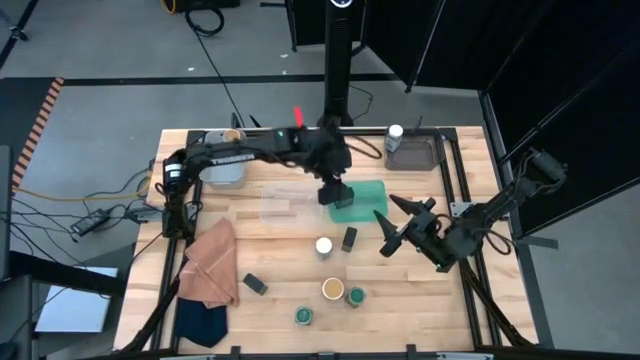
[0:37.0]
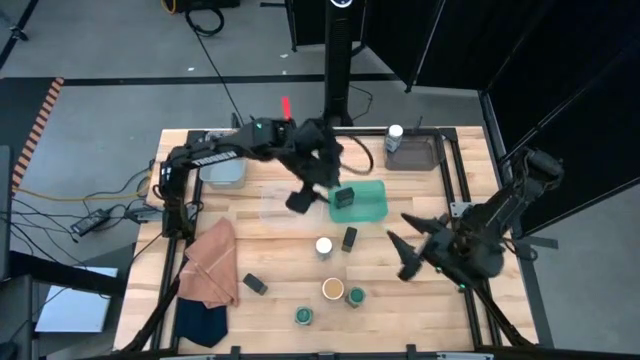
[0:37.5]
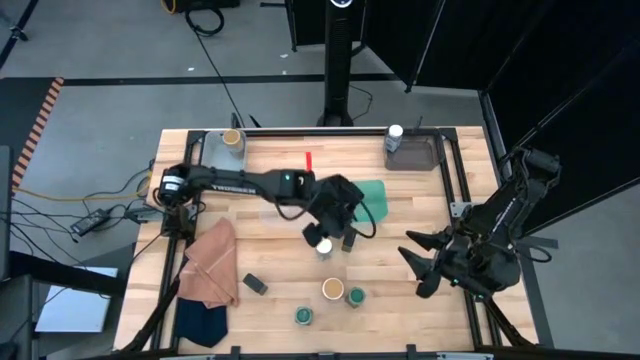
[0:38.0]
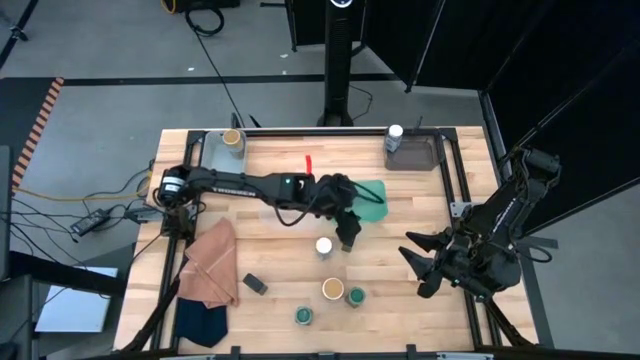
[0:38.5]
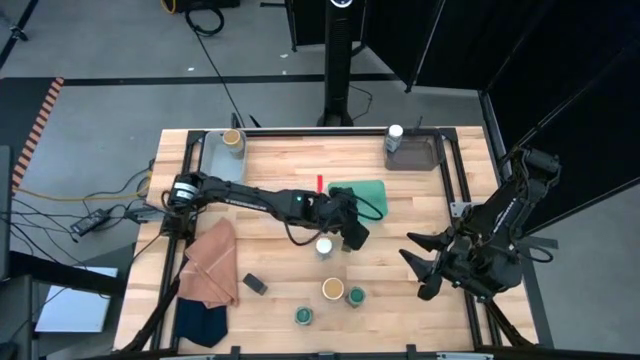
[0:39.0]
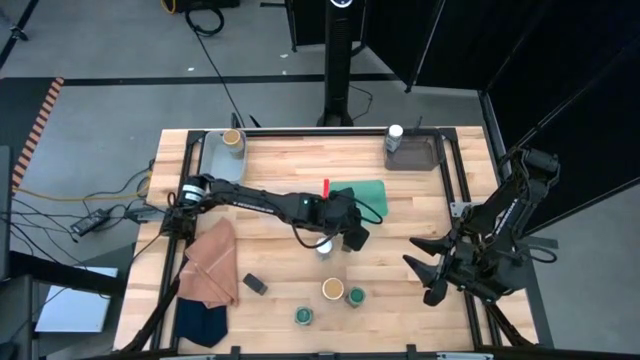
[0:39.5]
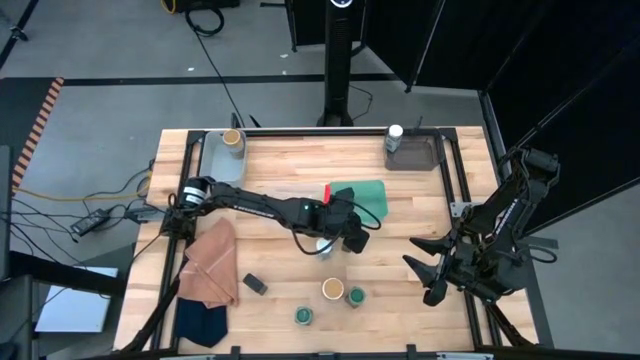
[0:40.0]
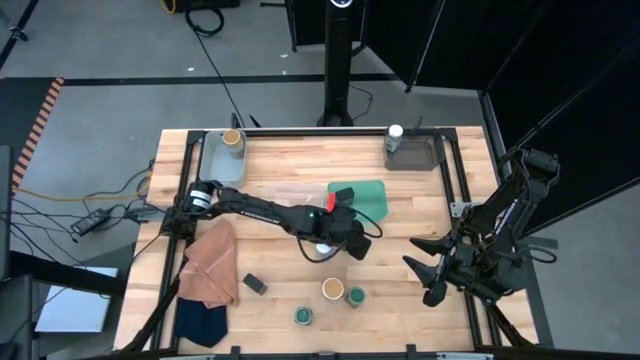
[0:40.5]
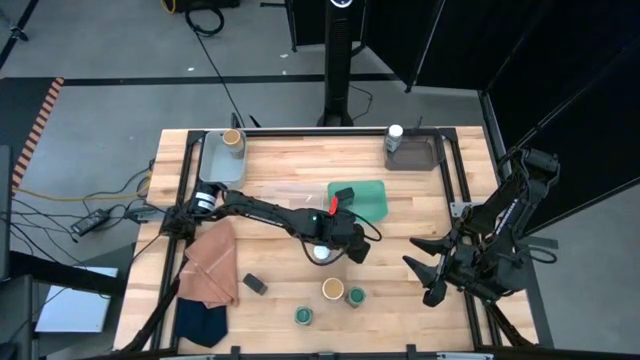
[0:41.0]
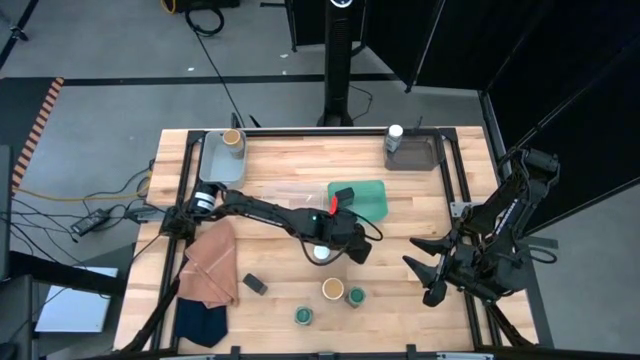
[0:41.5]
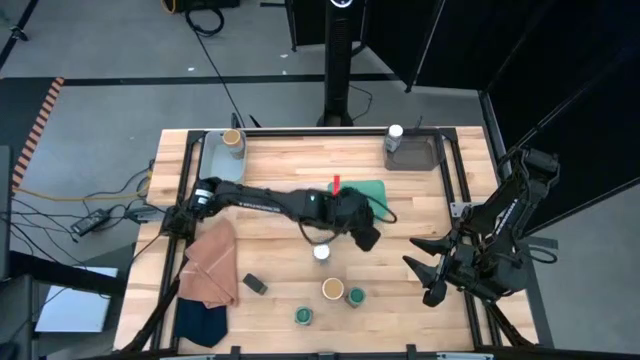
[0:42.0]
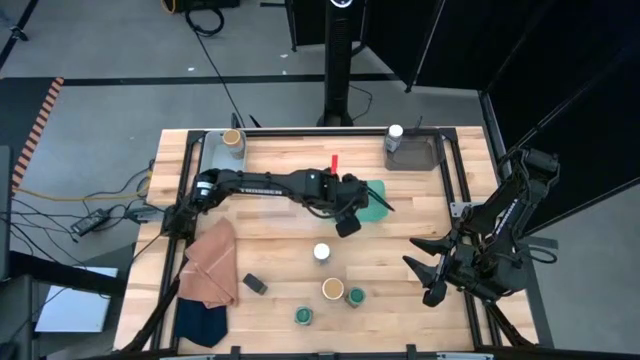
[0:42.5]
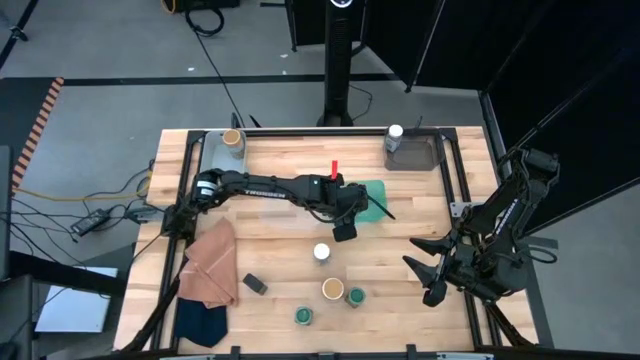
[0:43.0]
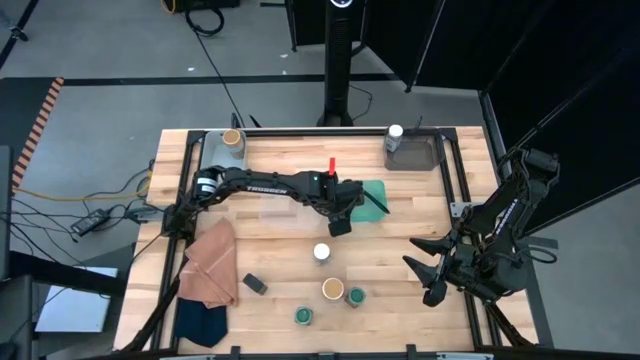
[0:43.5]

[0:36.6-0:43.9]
Task: Sort spices by type
Put the top green seasoning can into the green bin

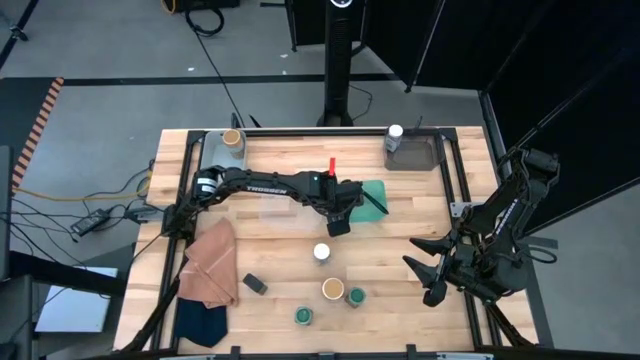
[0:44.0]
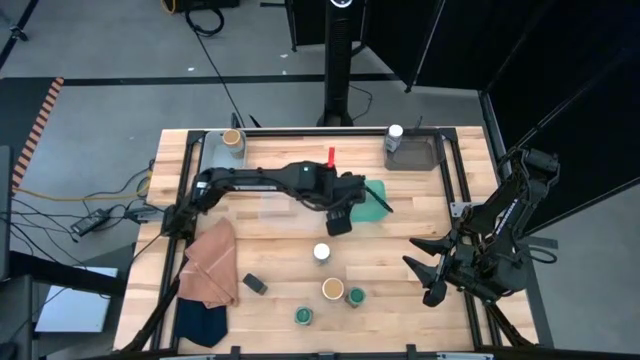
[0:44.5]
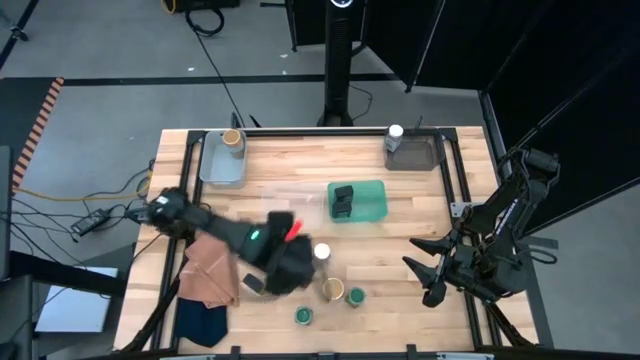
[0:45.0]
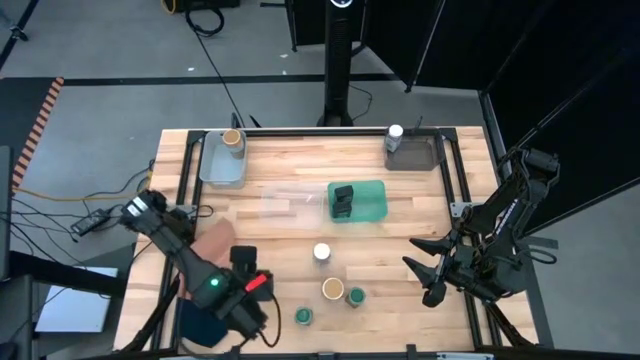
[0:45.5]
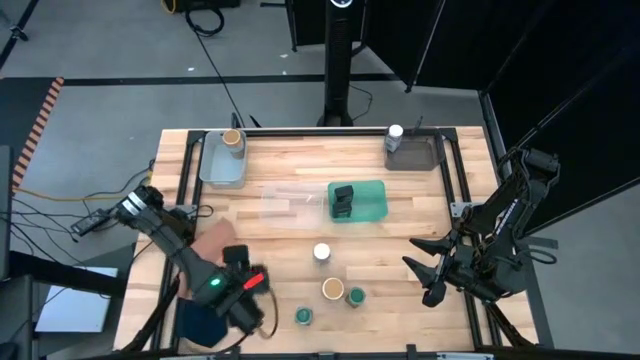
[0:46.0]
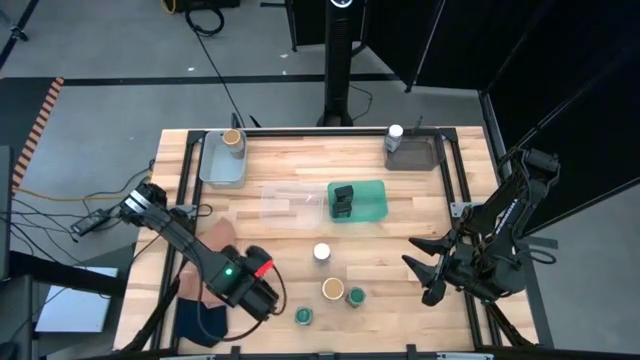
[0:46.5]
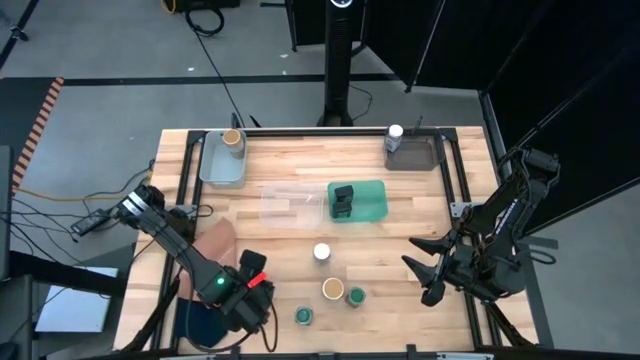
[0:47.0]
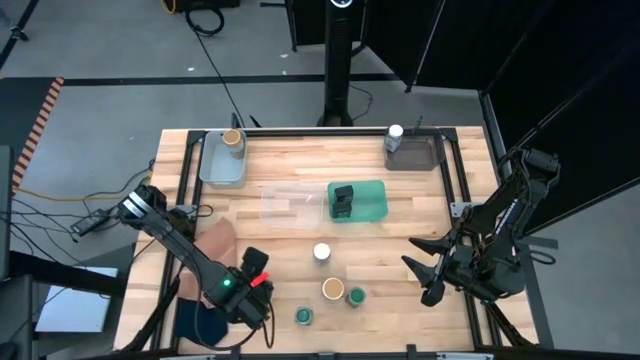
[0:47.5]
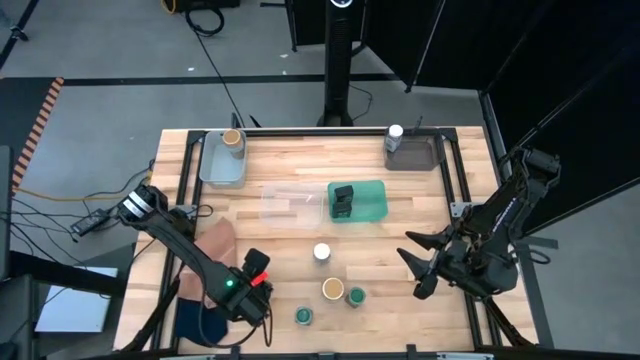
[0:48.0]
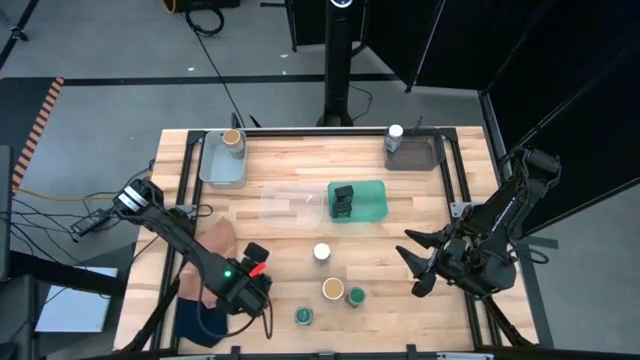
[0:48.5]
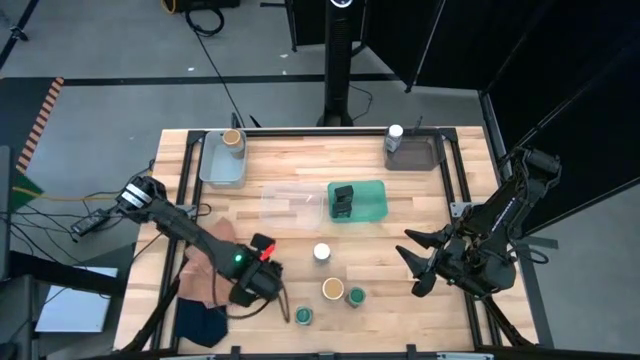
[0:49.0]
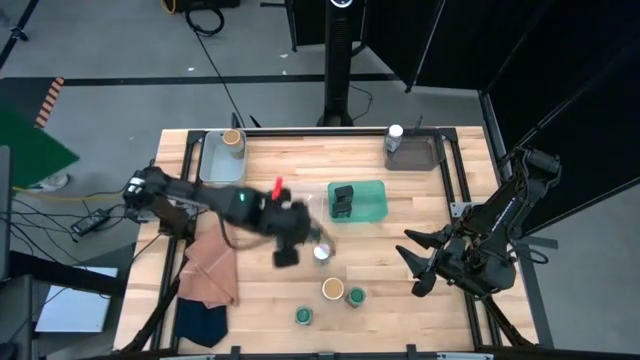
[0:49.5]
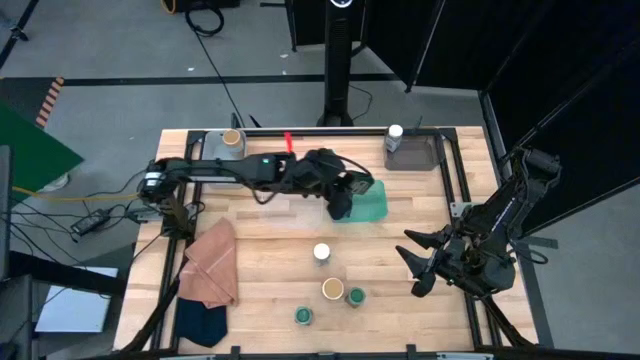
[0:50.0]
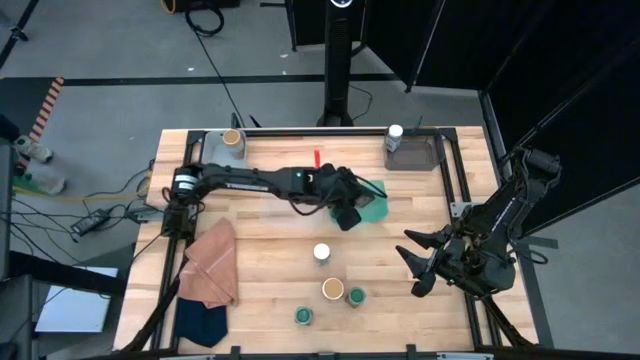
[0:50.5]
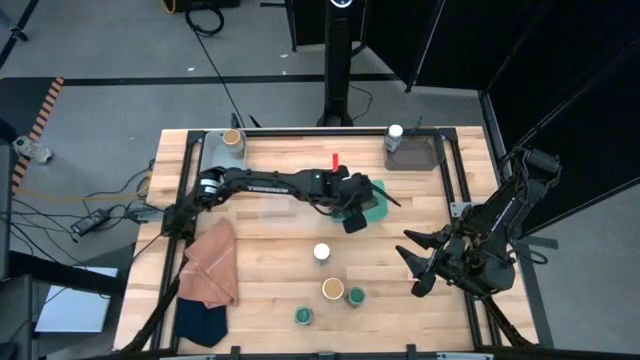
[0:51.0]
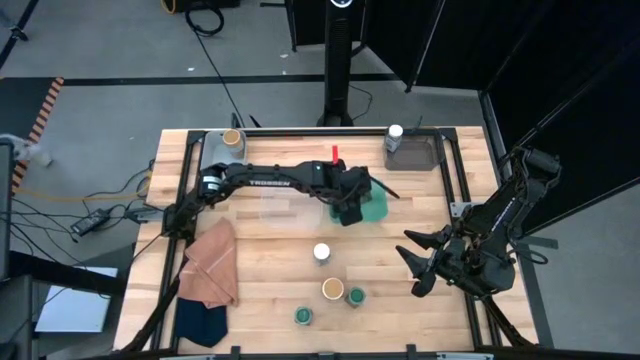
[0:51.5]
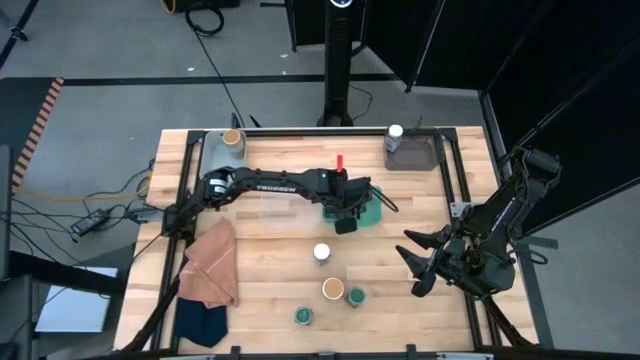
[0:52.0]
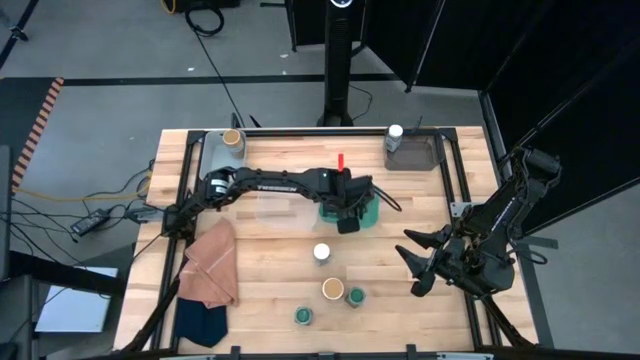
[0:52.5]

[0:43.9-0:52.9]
Put the green seasoning can into the green bin

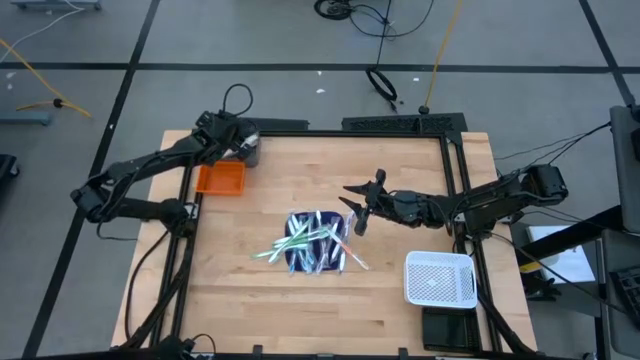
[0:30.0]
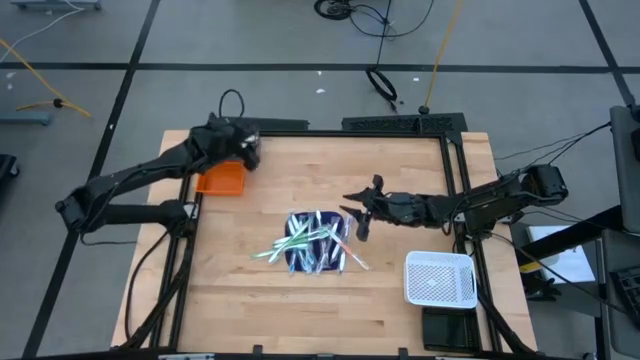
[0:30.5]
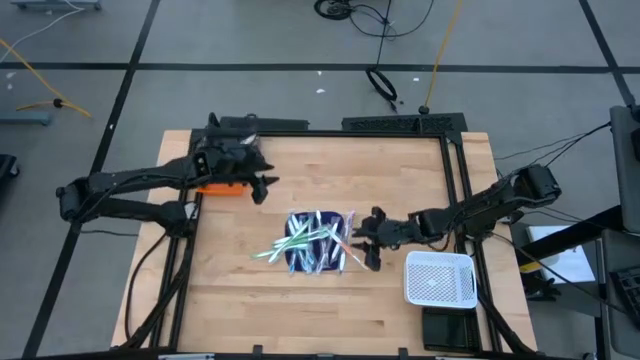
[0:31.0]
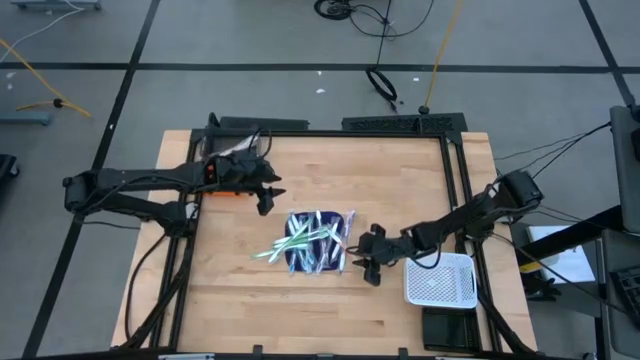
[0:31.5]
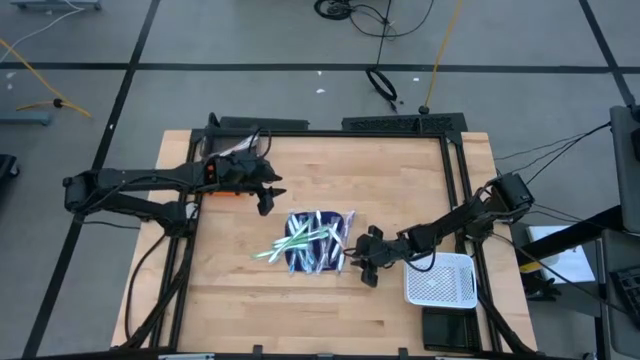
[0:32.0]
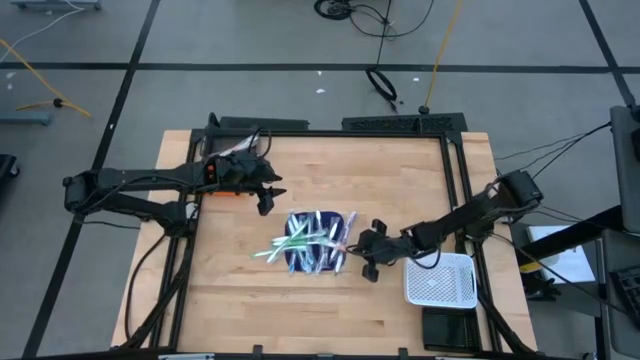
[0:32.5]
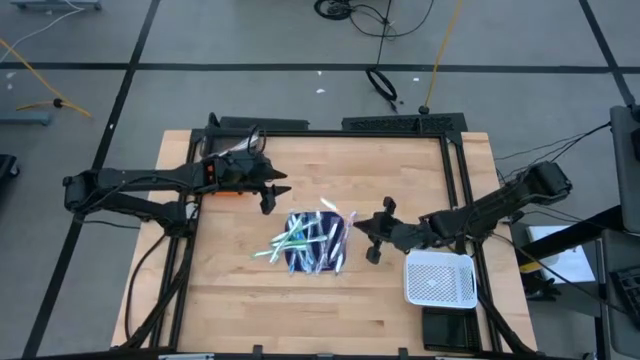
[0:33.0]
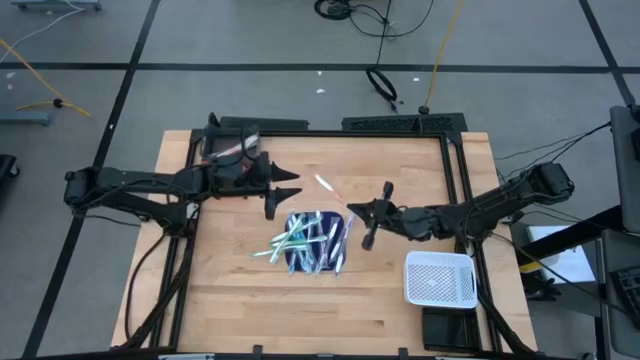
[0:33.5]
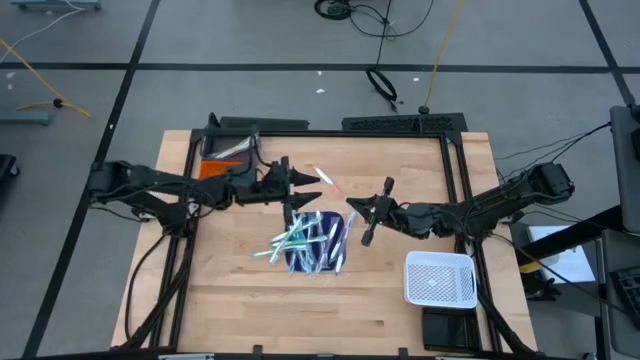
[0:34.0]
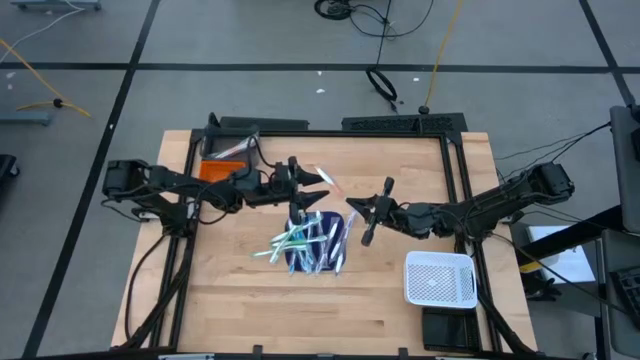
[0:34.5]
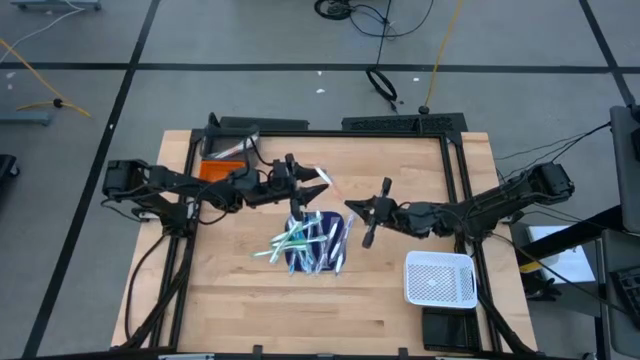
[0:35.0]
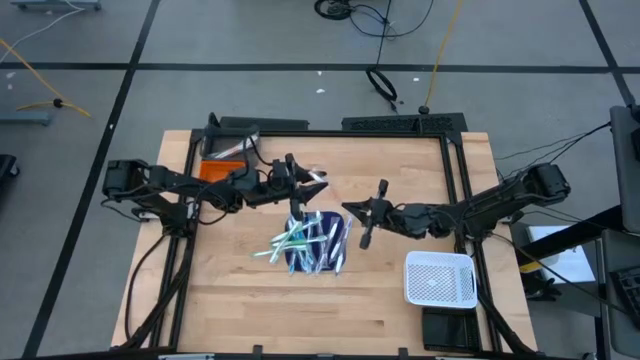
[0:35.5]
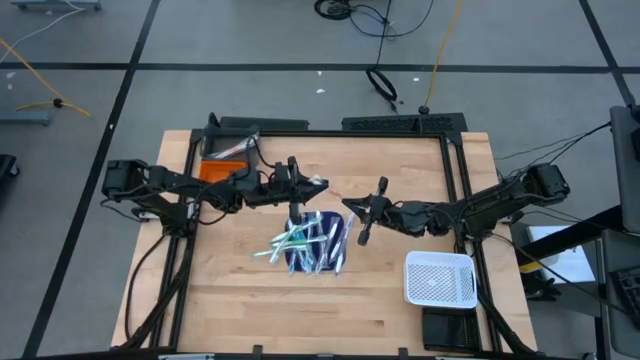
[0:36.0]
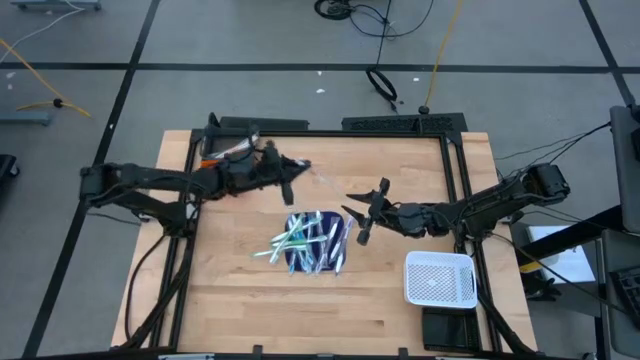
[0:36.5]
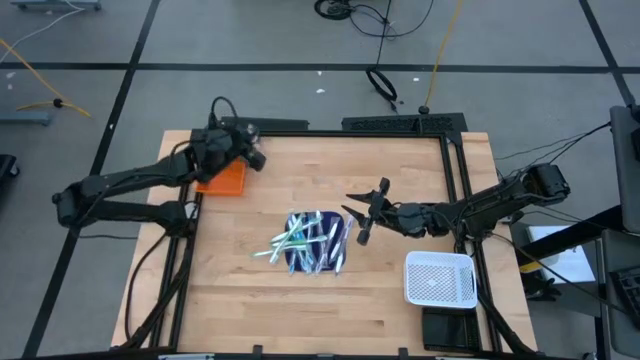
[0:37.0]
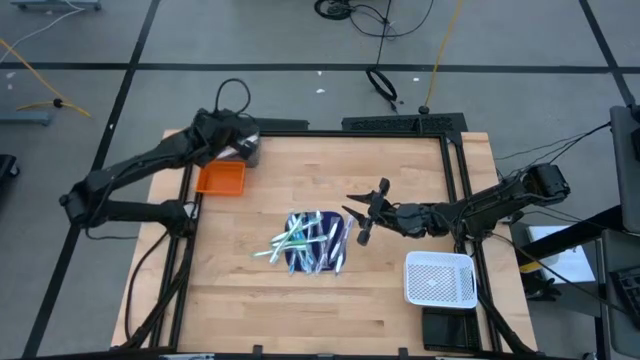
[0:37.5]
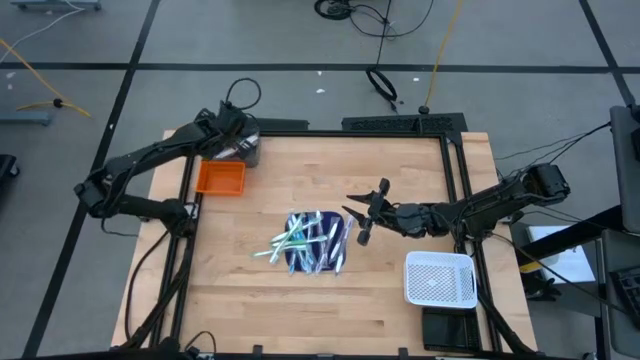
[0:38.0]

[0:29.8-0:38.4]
Task: Pick & Place Toothbrushes
Put the orange toothbrush into the transparent black bin
